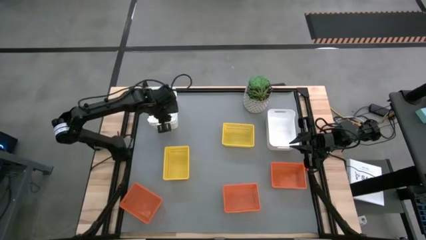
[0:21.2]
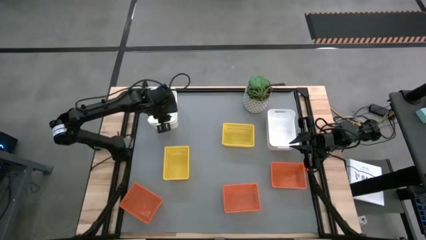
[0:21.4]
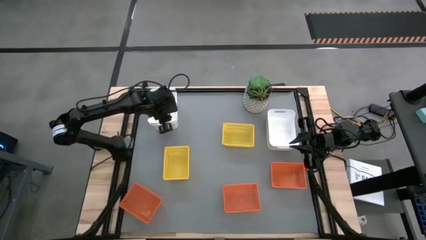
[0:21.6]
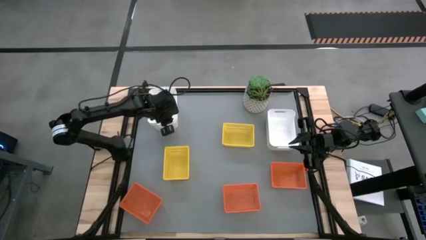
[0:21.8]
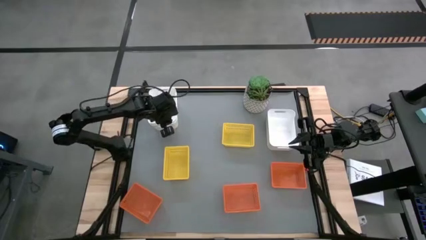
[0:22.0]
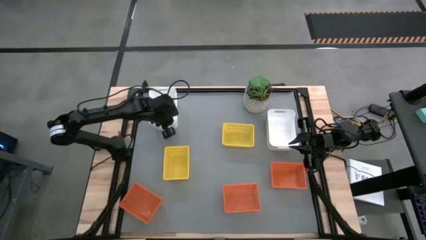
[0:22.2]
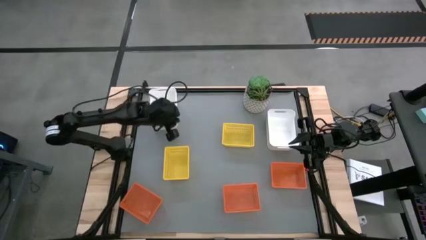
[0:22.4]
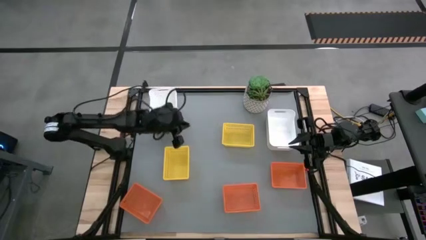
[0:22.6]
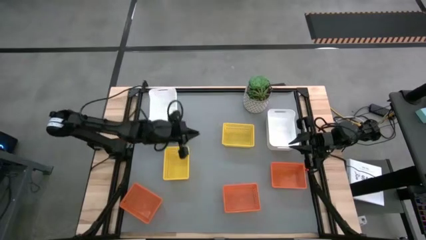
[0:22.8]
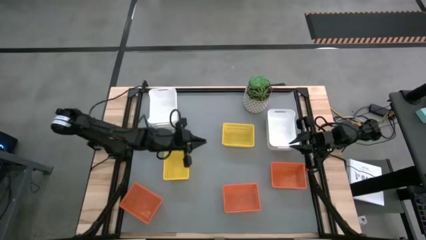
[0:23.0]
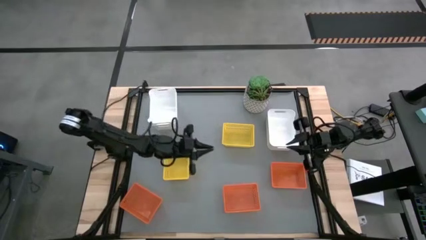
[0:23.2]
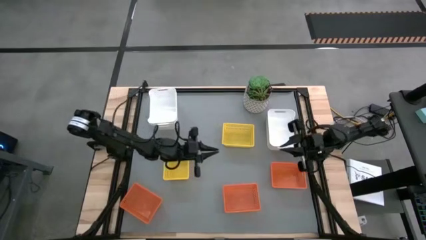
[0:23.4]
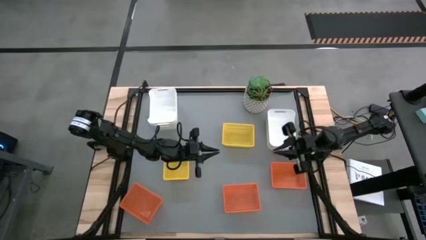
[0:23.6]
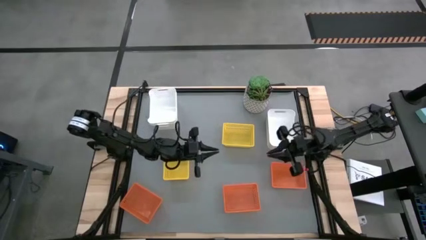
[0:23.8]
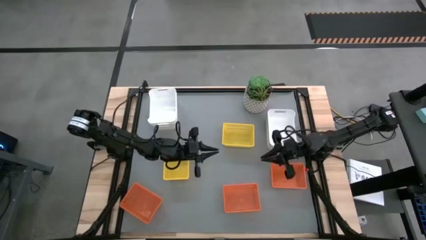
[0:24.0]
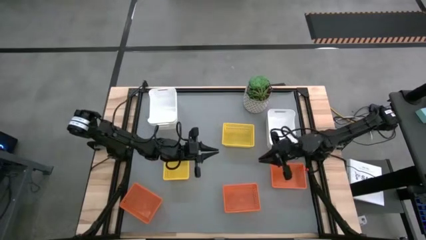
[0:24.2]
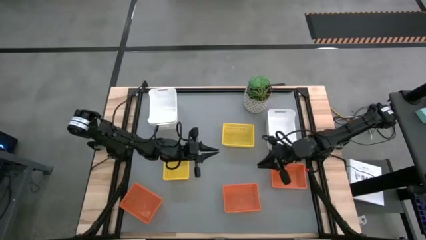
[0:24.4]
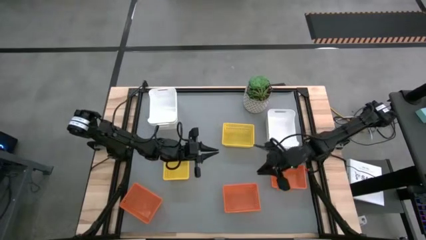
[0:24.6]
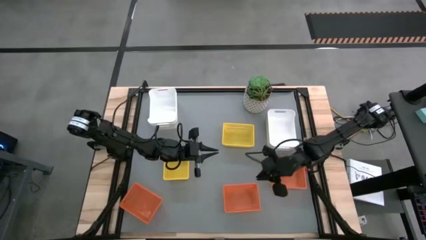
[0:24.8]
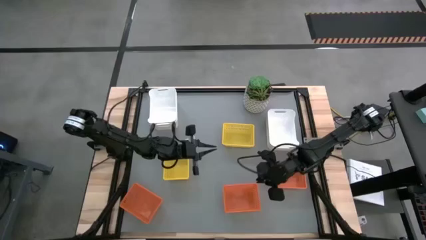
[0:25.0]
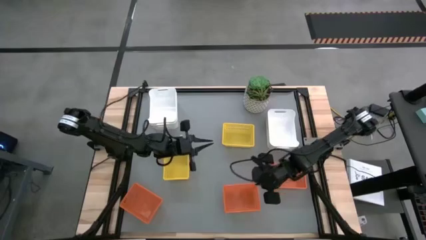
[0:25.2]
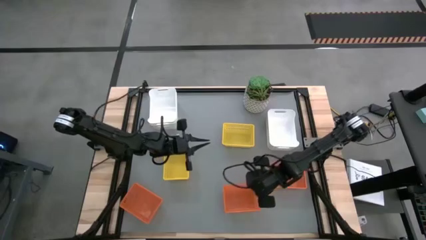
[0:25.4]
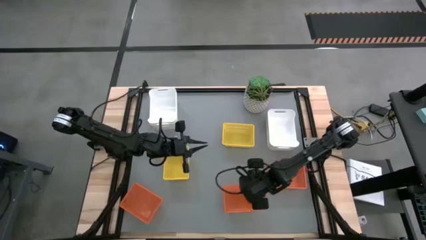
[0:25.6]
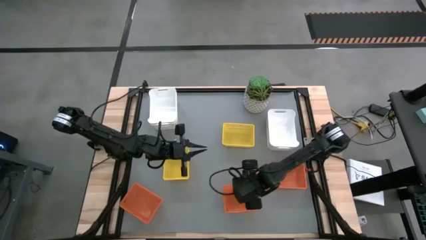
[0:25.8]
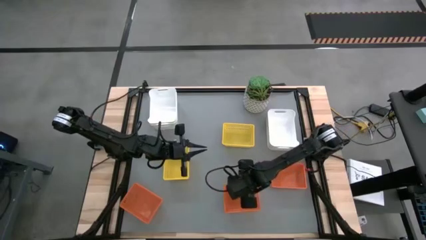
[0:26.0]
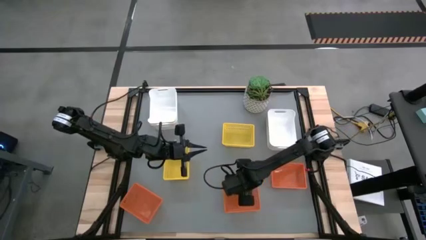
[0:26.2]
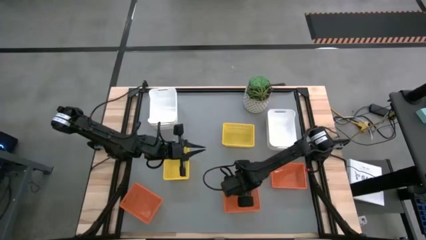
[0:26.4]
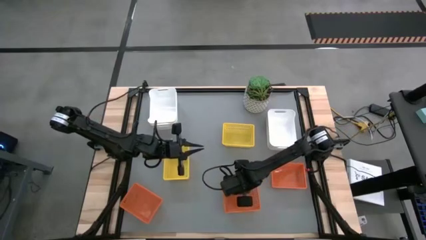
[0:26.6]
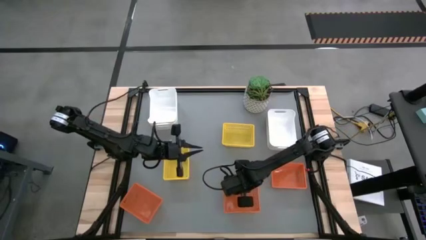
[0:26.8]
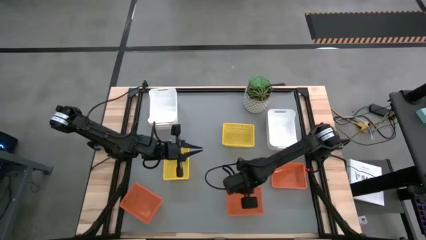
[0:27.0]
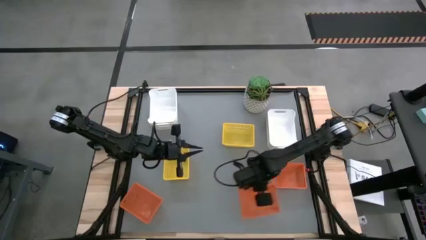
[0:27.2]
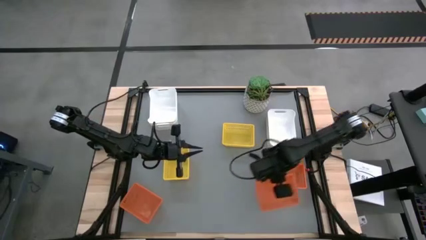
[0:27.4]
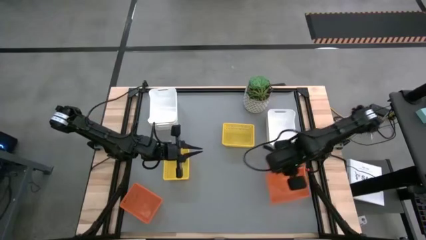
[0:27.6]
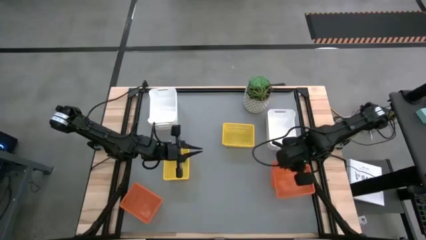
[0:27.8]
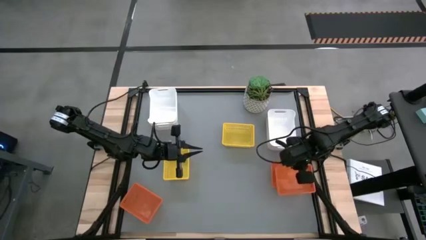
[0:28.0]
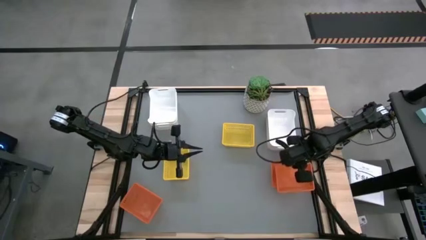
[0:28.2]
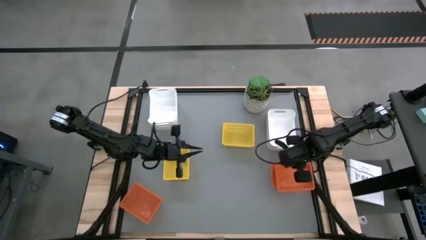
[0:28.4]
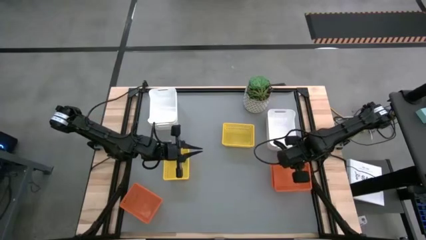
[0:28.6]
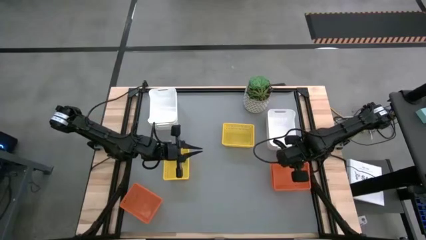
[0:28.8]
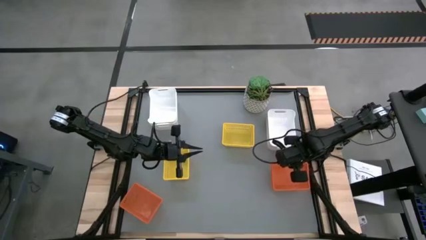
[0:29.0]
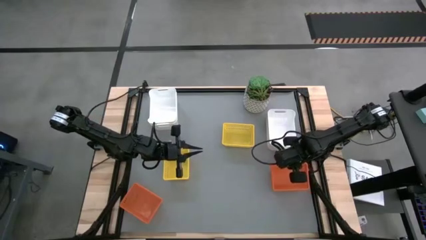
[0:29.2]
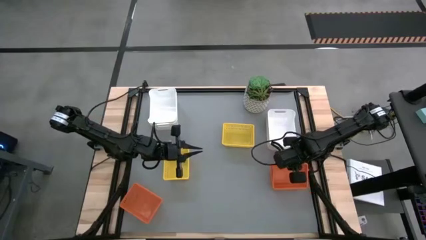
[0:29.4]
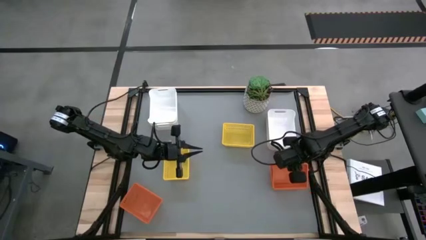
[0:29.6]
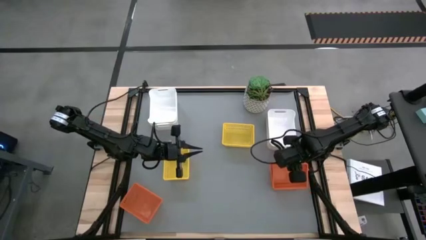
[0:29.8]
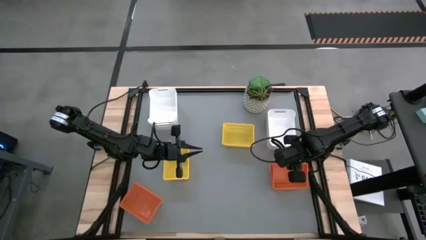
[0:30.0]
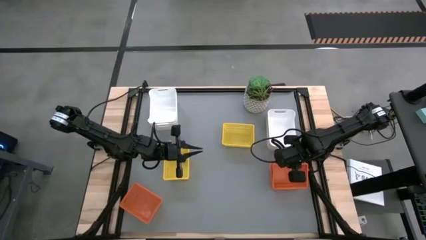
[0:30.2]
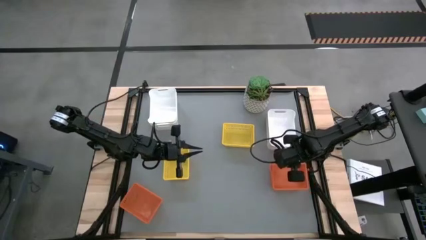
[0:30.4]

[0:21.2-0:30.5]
Stack the middle orange bin on top of the right orange bin
